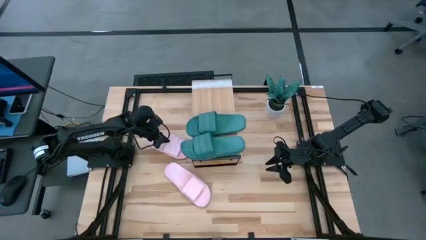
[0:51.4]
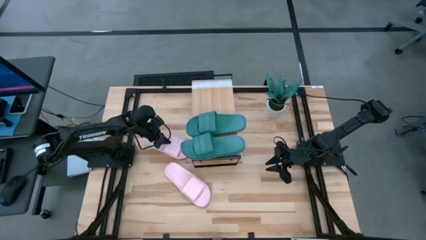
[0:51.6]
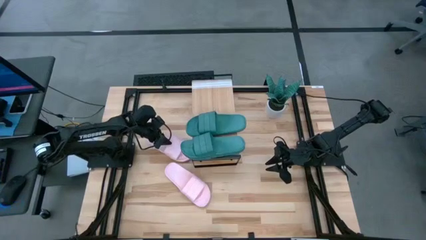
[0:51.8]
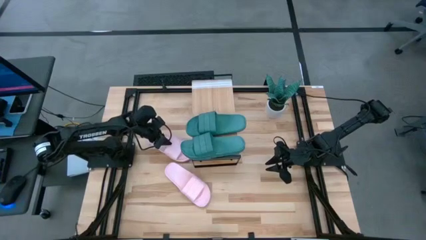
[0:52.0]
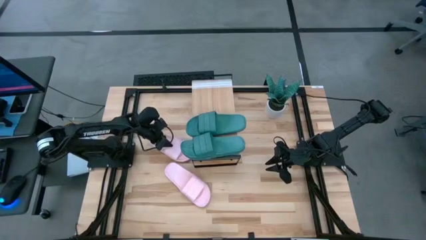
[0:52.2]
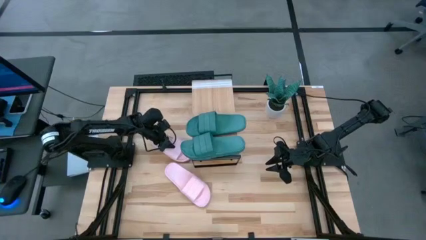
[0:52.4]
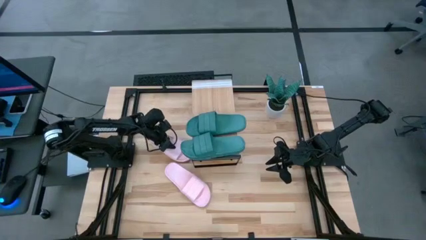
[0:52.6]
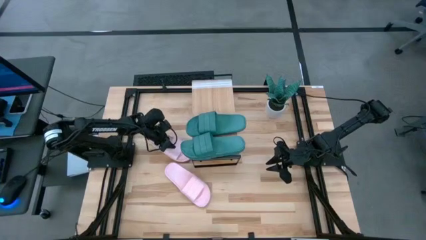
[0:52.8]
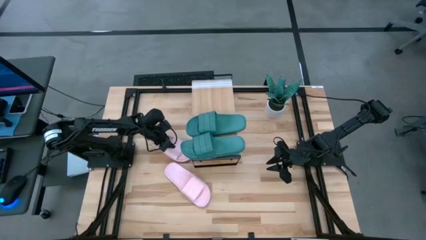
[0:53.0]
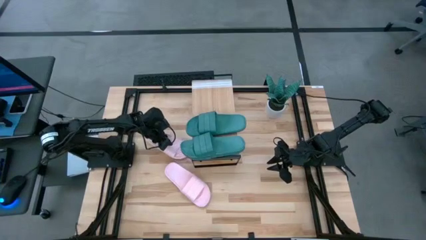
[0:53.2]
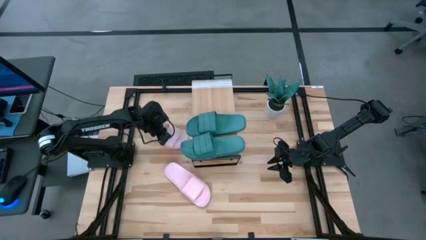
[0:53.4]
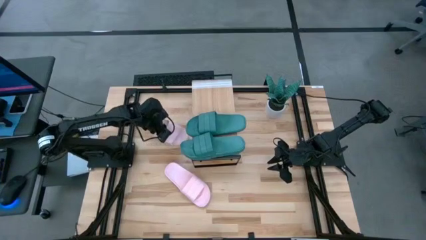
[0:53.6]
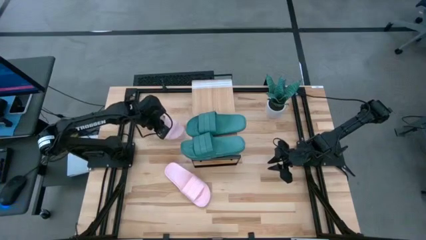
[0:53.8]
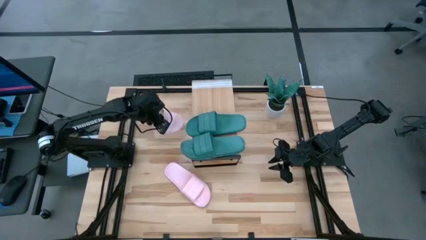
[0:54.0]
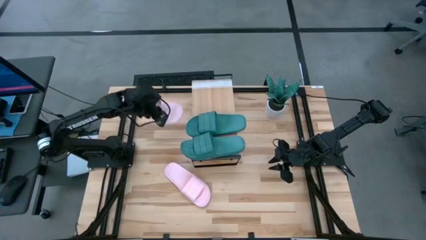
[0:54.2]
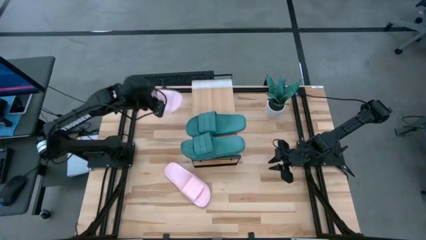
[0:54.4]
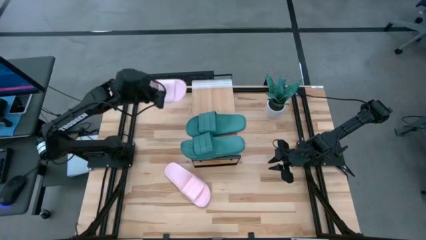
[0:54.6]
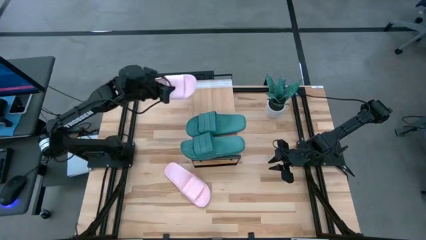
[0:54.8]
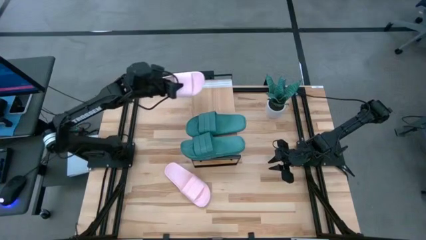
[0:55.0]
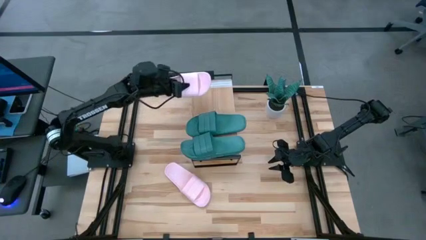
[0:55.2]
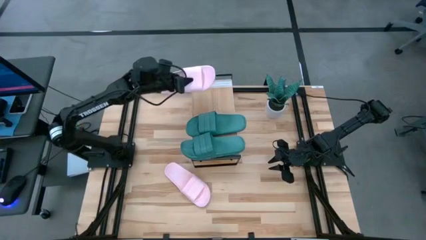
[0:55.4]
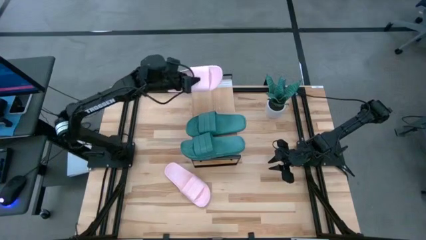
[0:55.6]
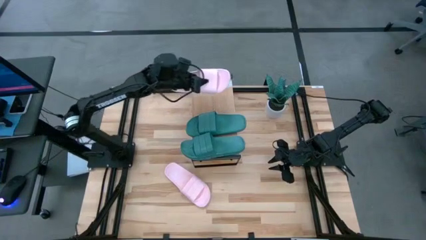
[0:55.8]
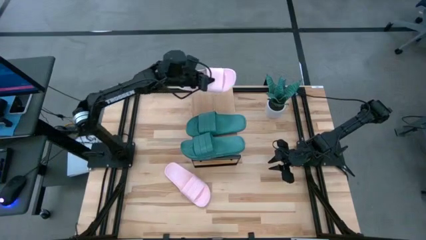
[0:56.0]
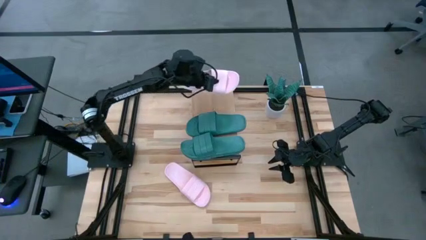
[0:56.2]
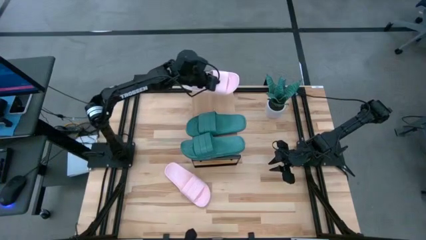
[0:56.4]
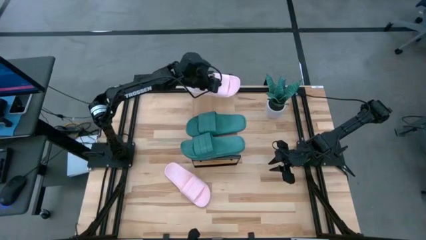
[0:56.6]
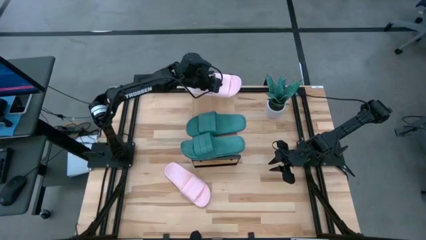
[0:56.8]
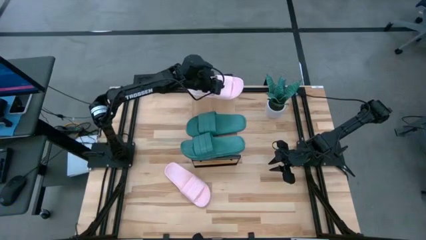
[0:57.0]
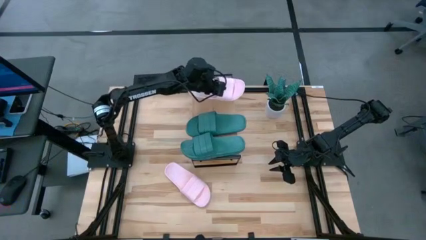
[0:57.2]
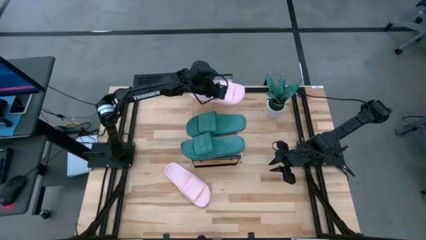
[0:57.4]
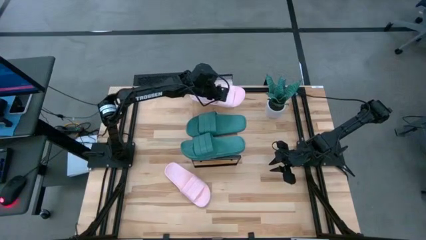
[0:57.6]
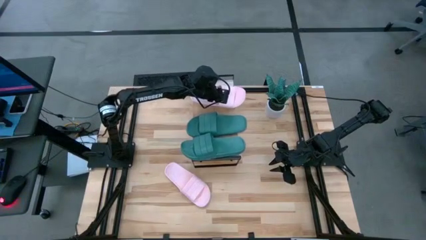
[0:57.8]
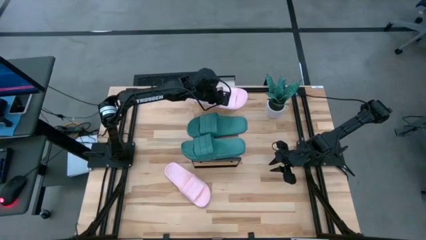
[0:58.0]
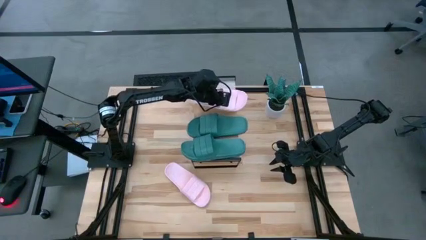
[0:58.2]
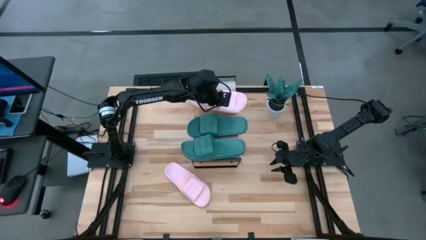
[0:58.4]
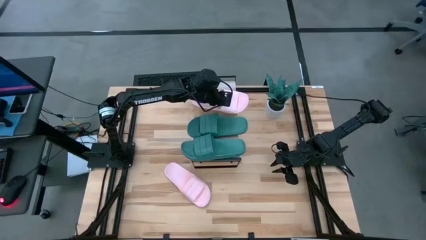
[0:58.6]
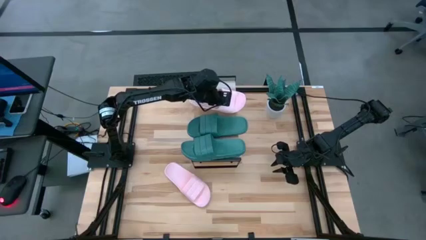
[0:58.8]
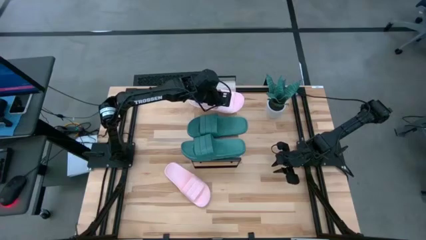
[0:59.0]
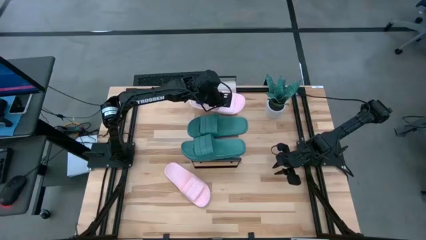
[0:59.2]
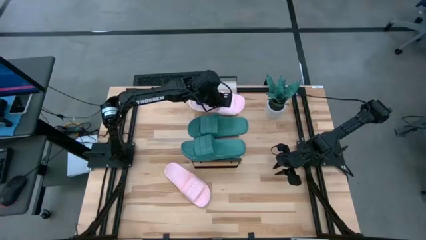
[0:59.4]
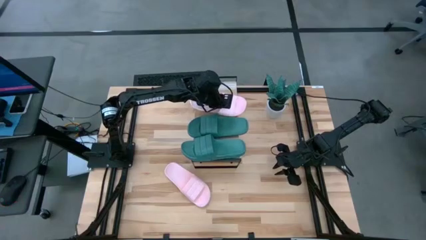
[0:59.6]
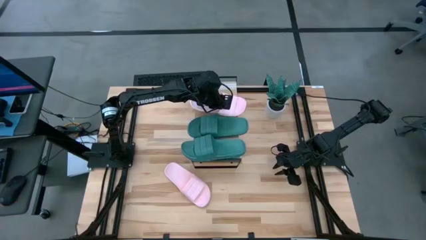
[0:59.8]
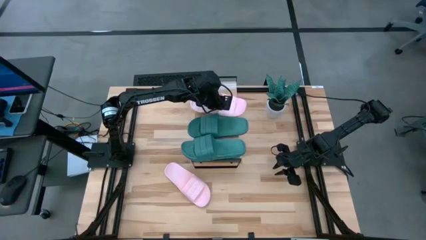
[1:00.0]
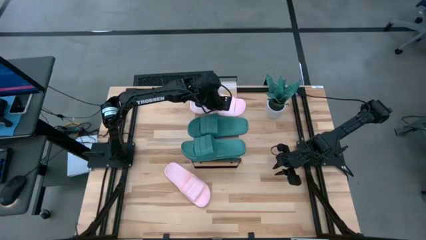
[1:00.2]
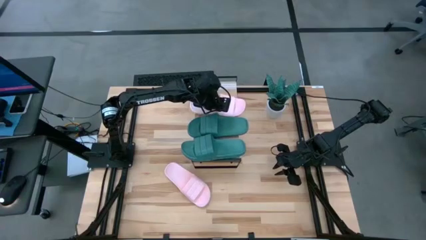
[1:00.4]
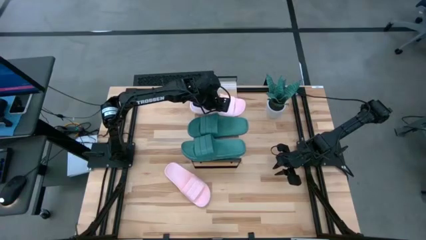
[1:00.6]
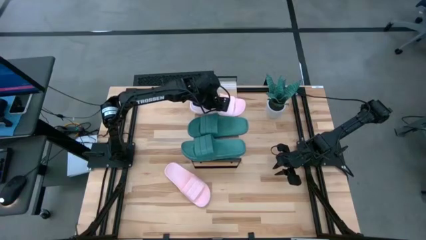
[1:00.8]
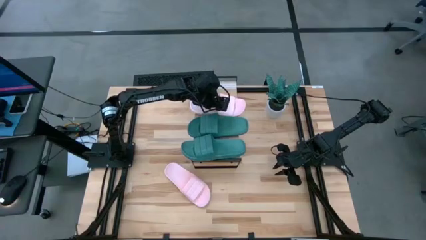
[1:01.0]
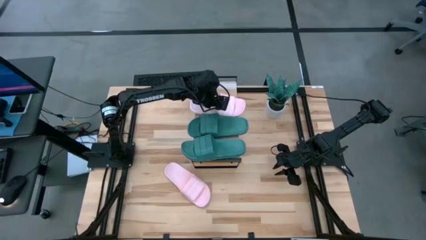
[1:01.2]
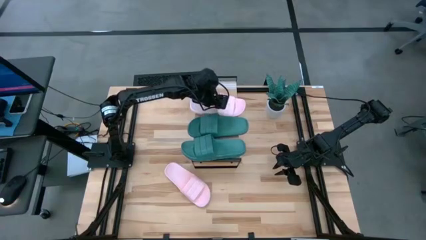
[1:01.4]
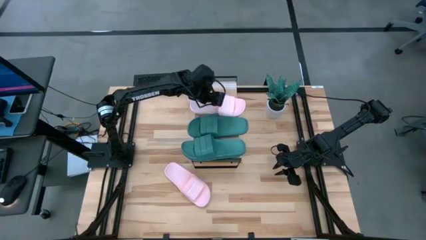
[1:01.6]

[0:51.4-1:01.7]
Task: Pick and place slides into the shelf
Put the top pink slide on the shelf
